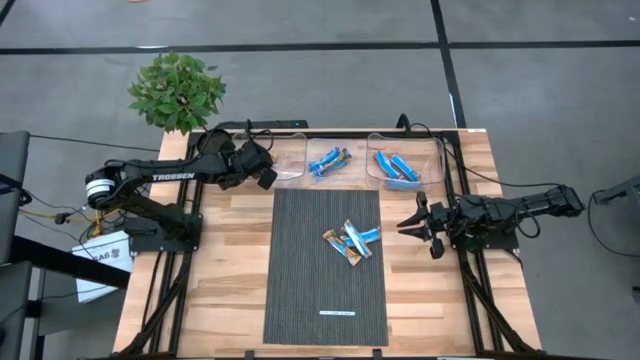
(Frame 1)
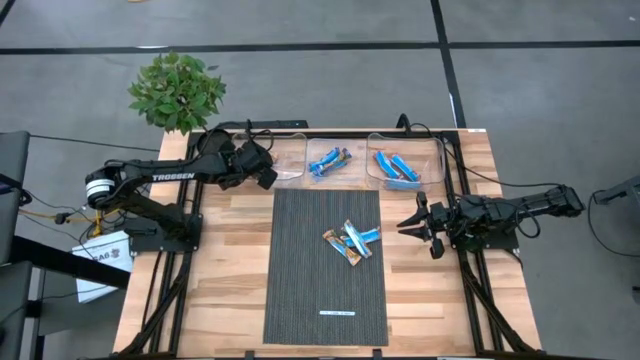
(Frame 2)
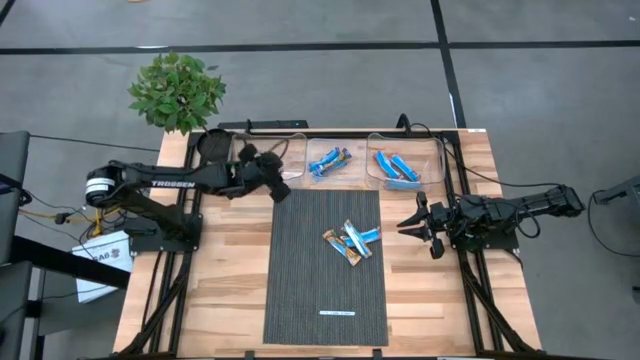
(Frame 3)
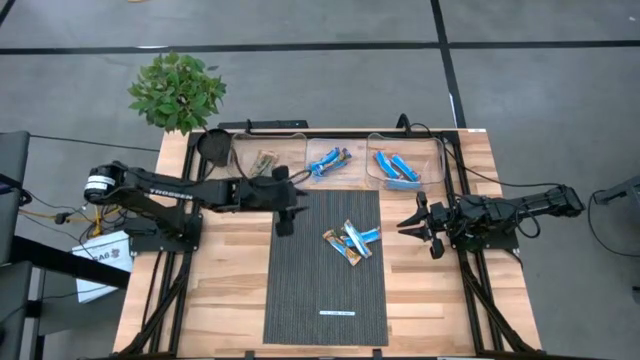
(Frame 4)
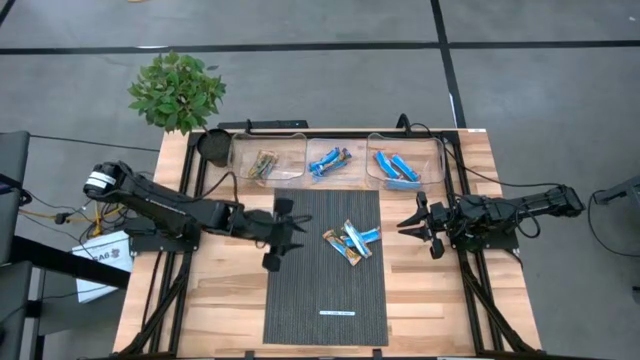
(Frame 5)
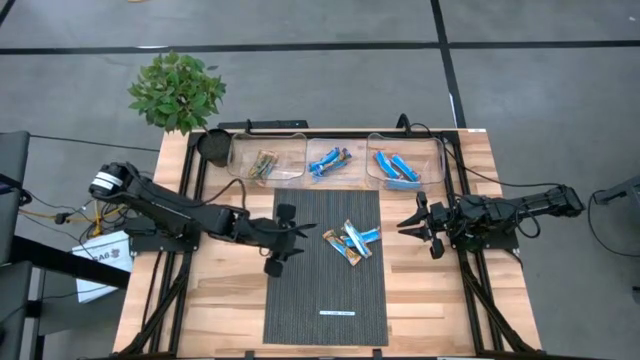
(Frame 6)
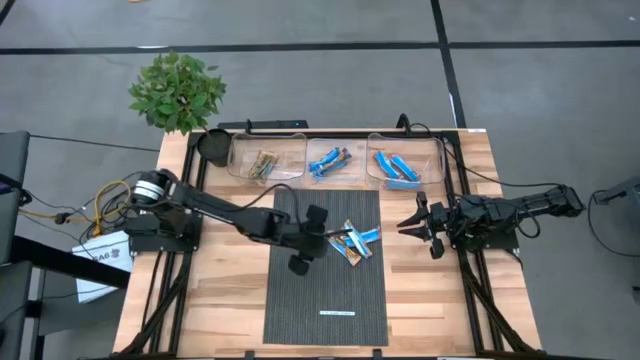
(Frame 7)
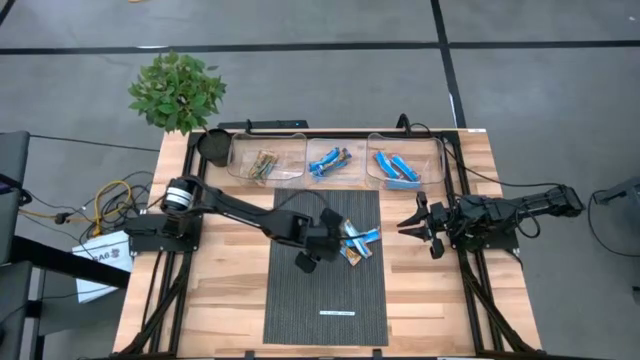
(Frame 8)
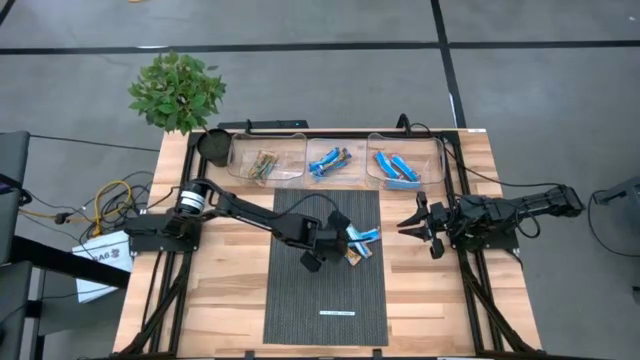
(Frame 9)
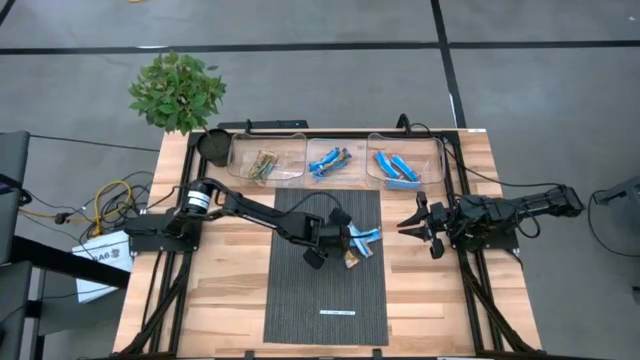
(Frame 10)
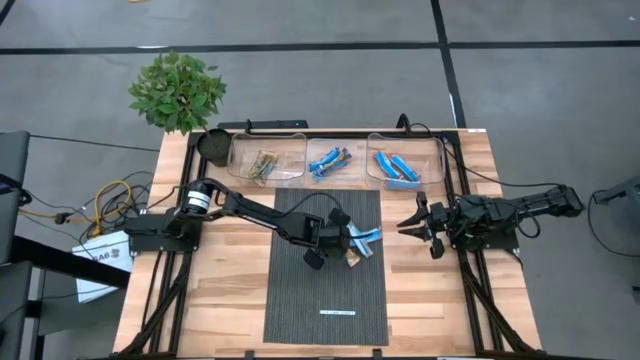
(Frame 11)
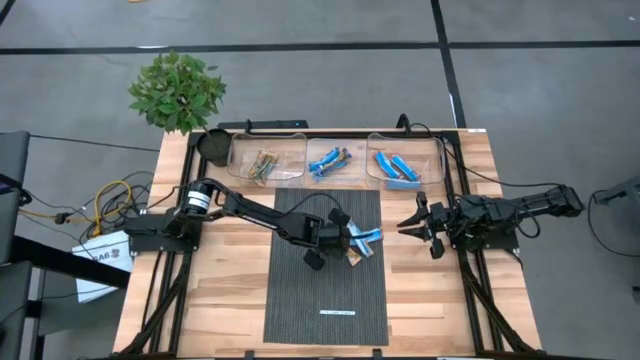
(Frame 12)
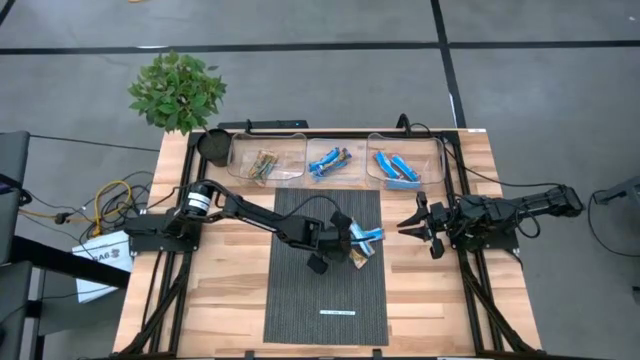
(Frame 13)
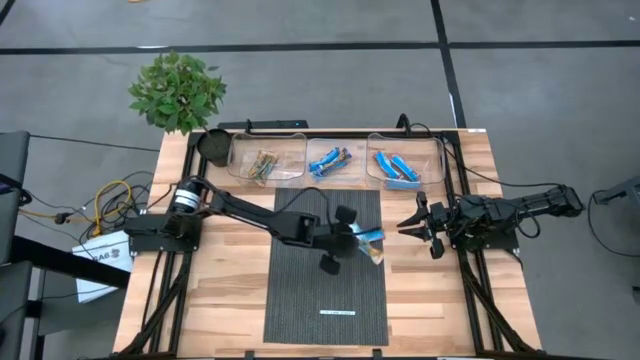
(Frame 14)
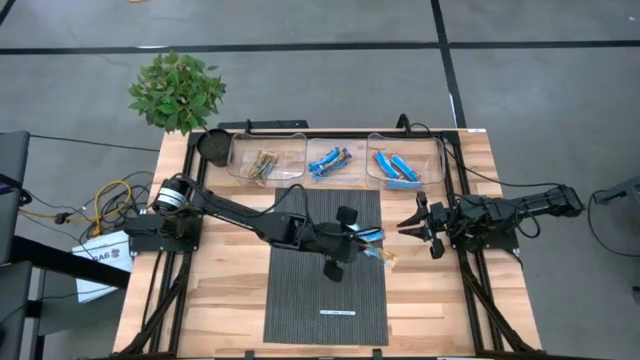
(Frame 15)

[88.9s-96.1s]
Task: Pick and place Granola Bars by type
Put the yellow granola bar into the left transparent bin

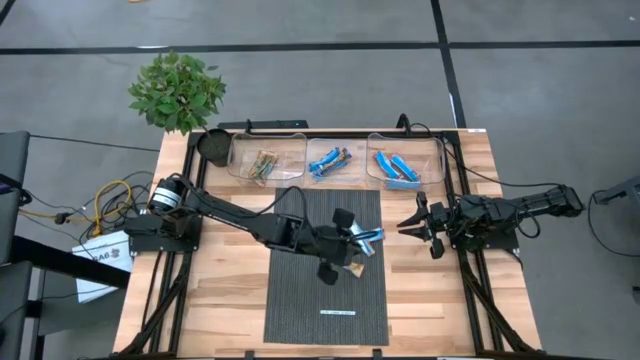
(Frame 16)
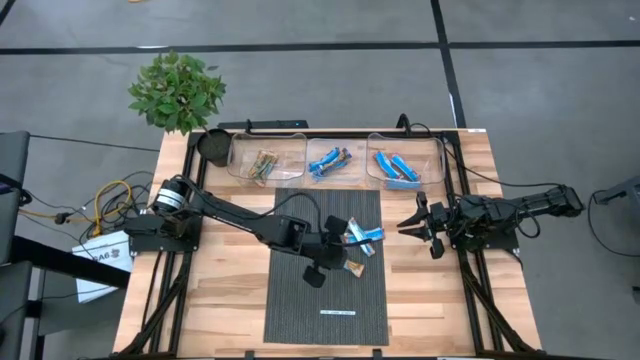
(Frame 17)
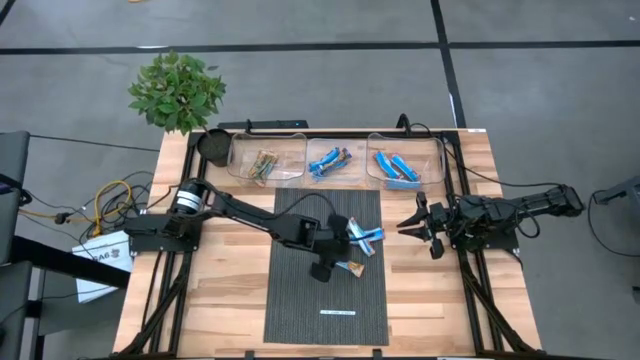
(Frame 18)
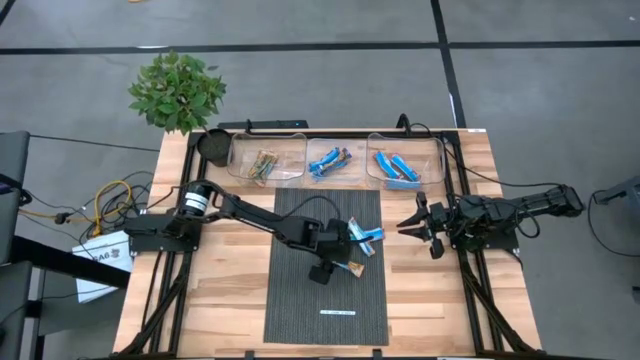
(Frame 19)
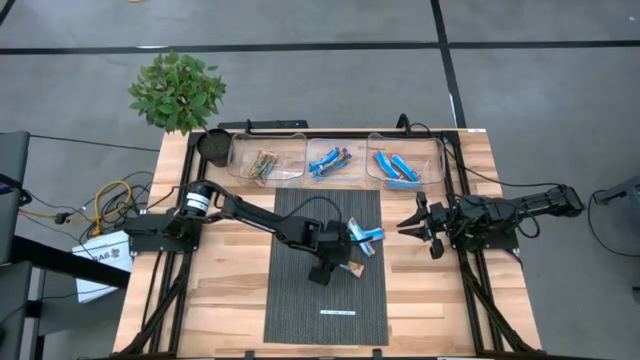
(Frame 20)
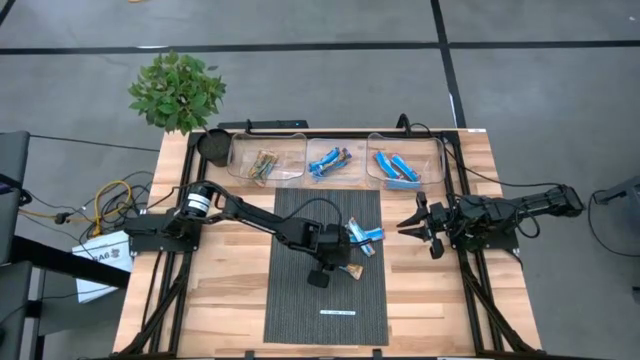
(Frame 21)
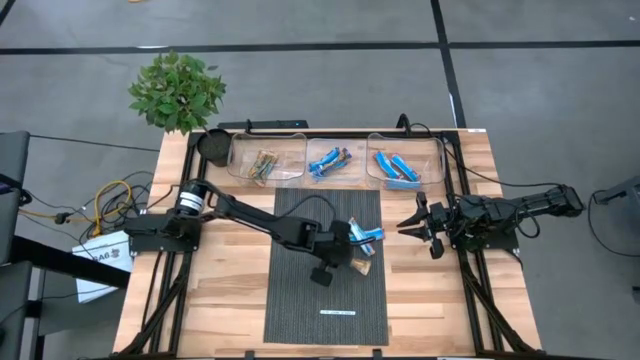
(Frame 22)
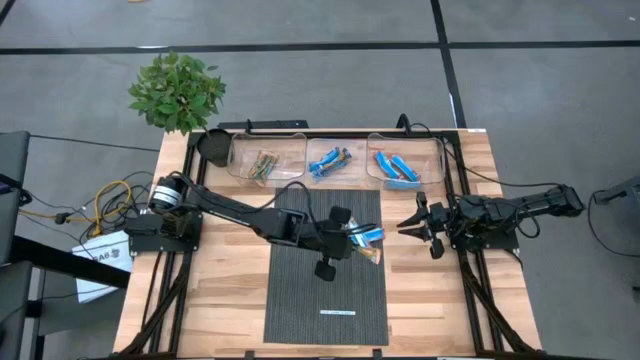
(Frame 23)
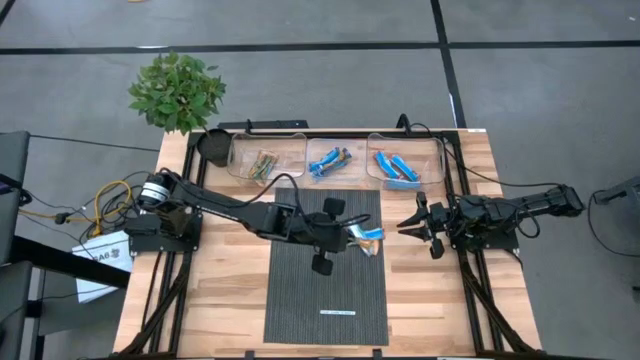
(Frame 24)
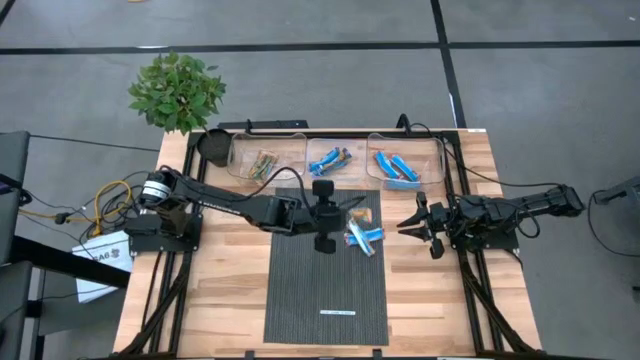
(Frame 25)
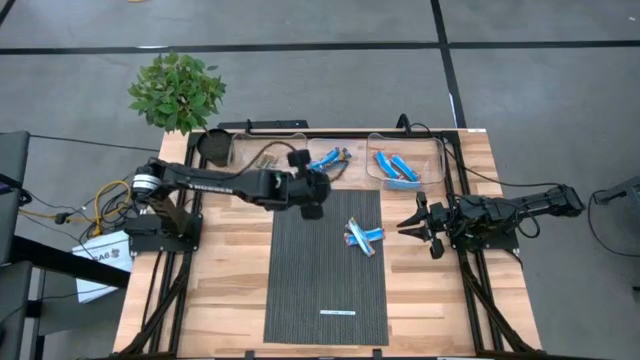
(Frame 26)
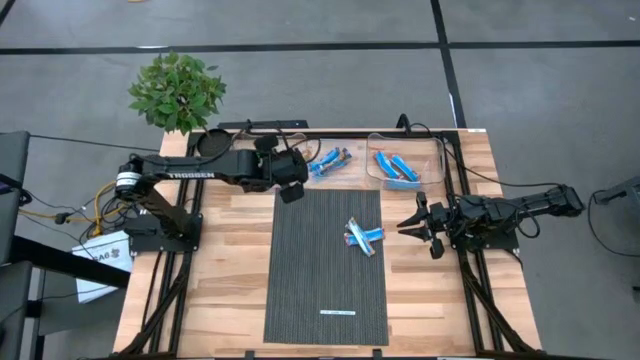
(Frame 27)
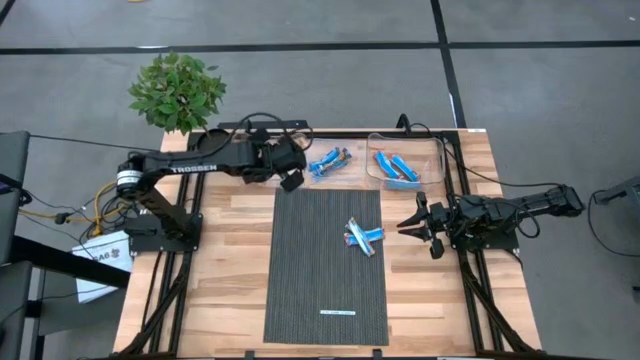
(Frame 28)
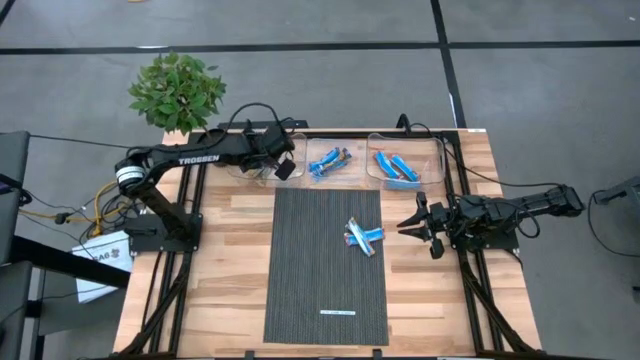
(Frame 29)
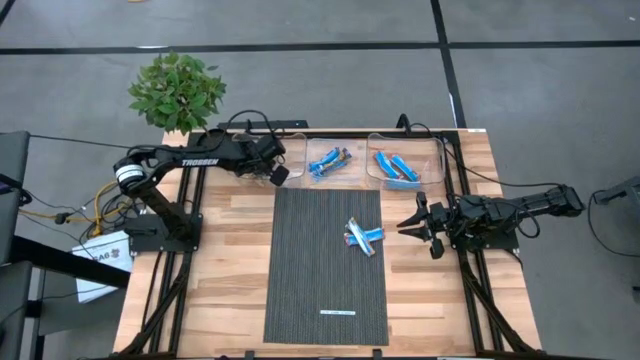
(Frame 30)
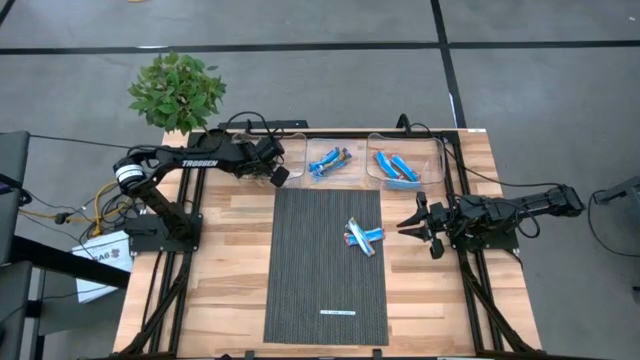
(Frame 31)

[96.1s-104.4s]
Put the yellow granola bar into the left transparent bin

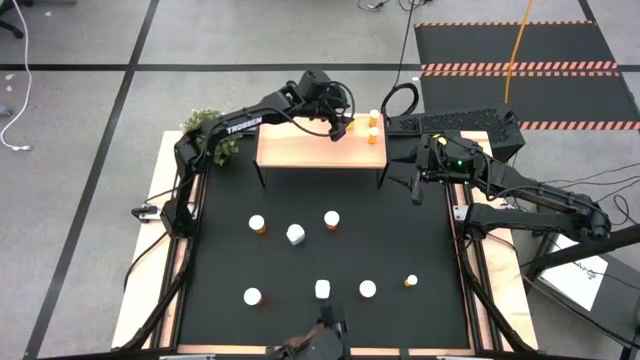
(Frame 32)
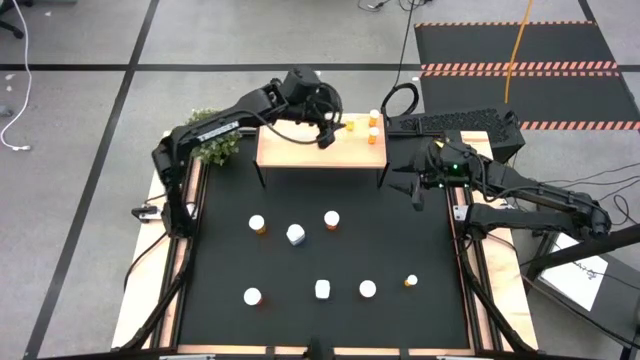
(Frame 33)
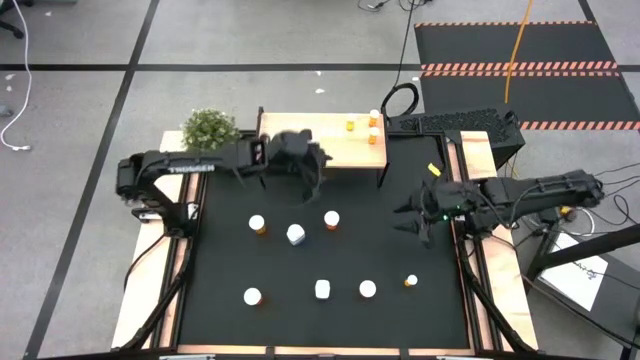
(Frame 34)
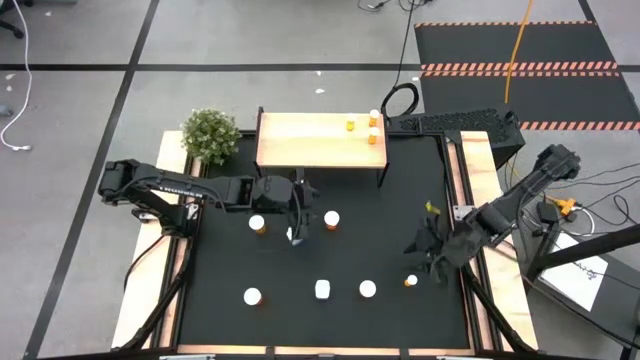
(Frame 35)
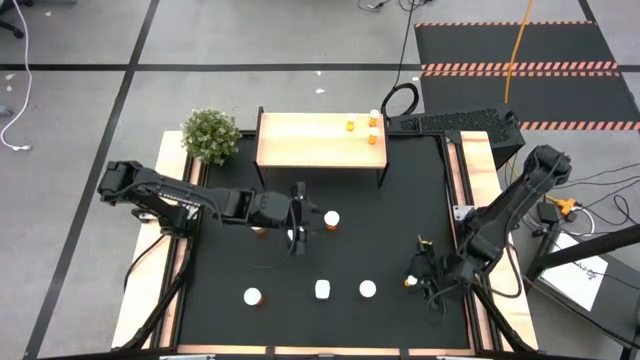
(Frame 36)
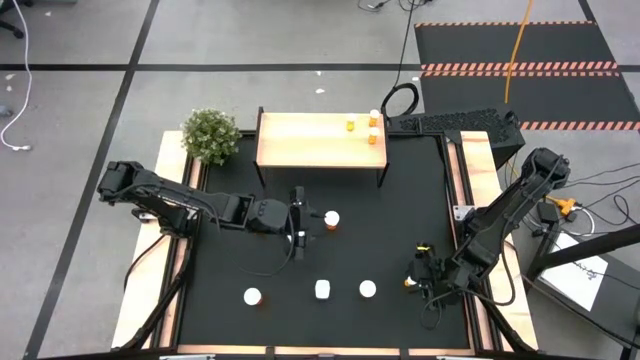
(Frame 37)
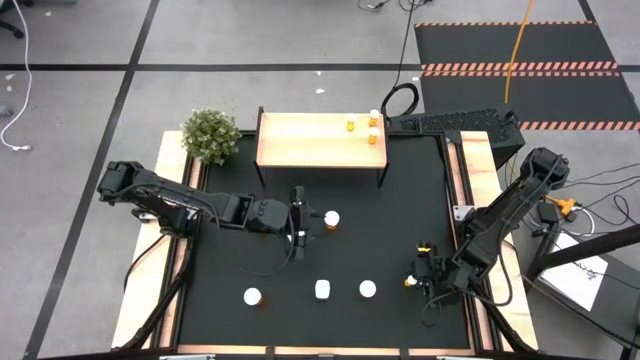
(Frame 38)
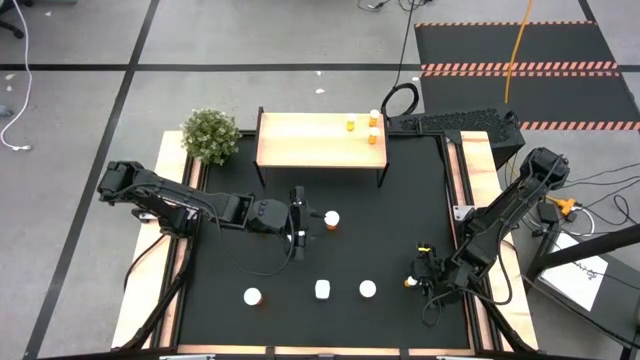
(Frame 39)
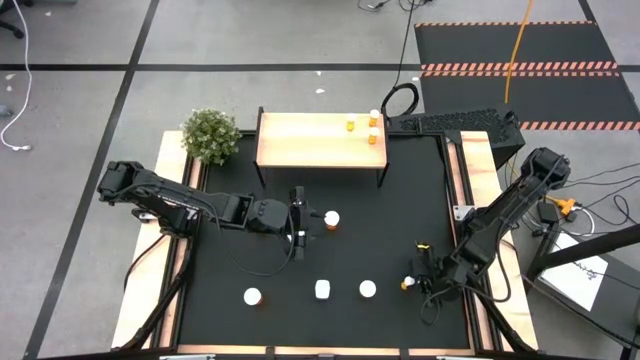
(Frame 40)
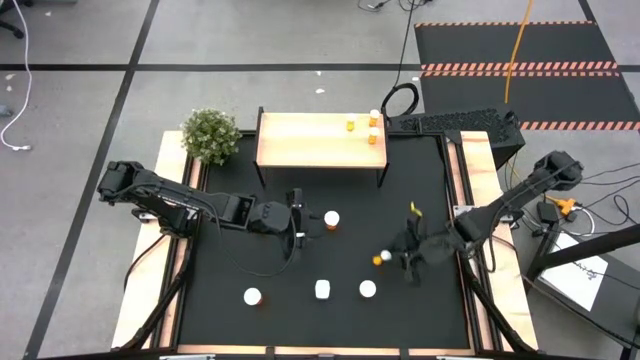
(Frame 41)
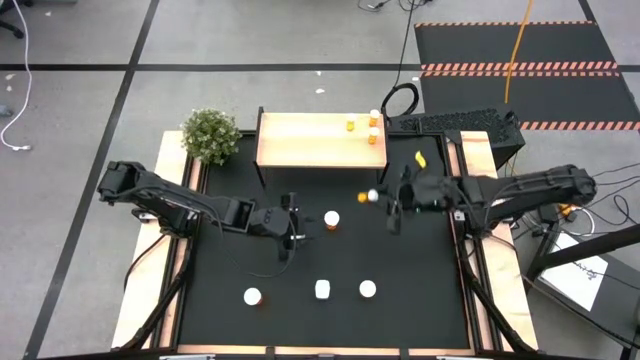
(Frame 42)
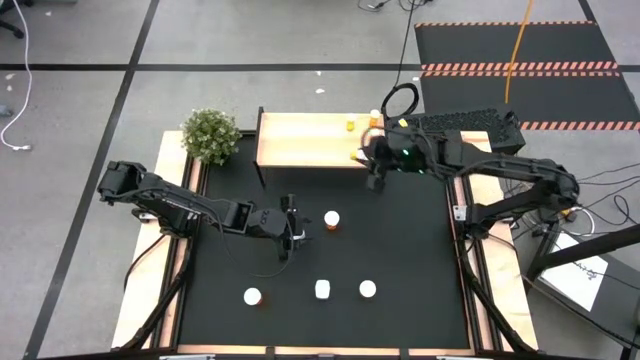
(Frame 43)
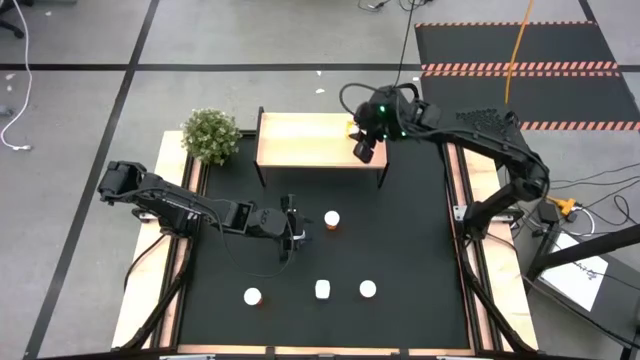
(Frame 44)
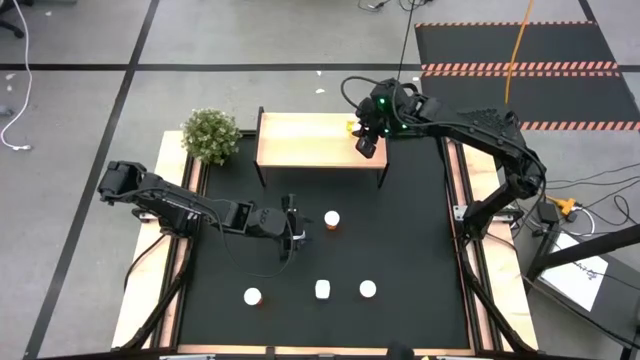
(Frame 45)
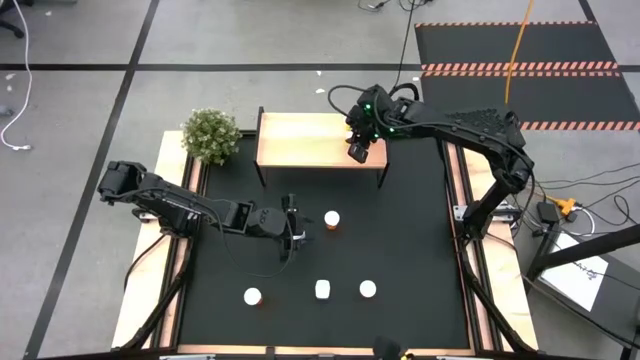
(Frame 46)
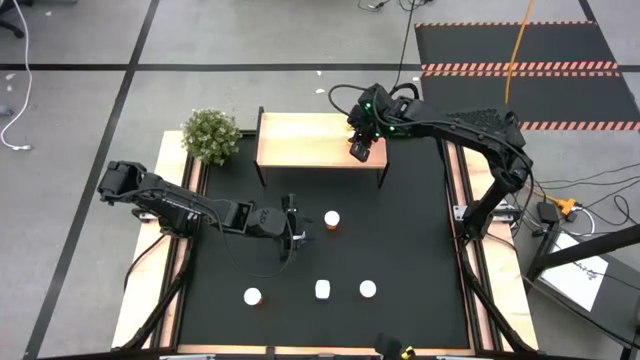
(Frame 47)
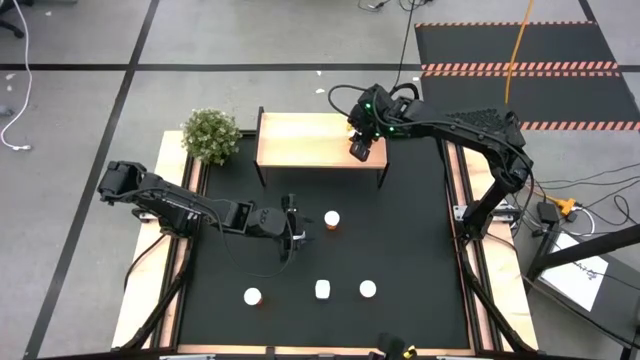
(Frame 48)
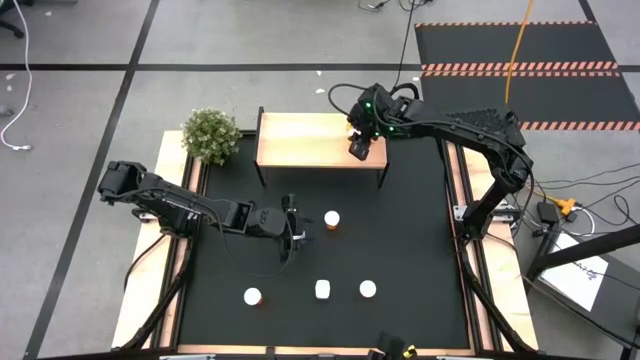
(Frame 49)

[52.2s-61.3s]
Task: Pick and place medicine bottles onto shelf by color
Put the small orange pill bottle on the shelf aligned with the other small orange pill bottle
